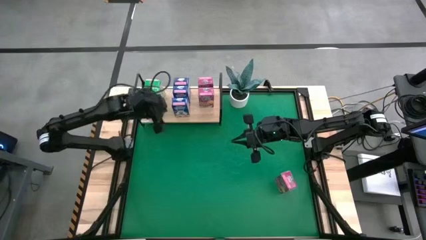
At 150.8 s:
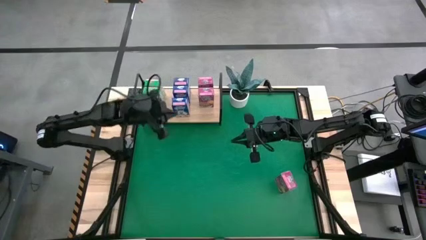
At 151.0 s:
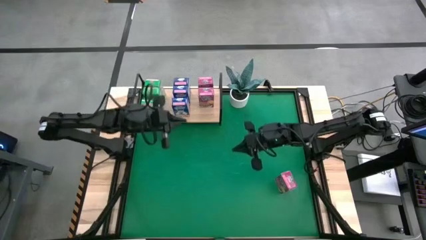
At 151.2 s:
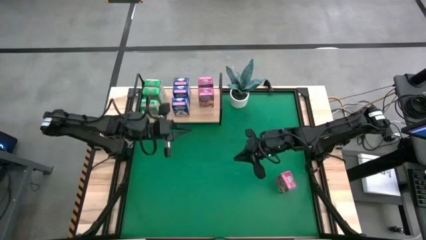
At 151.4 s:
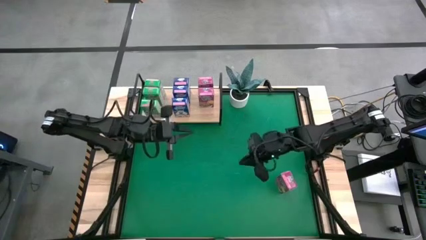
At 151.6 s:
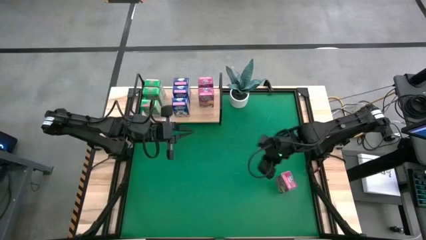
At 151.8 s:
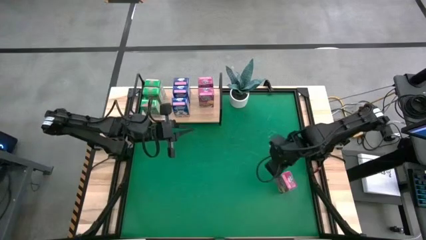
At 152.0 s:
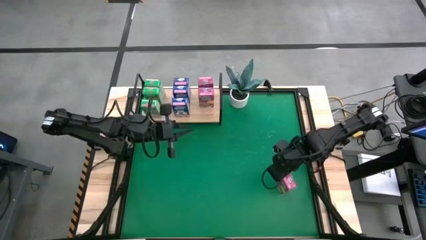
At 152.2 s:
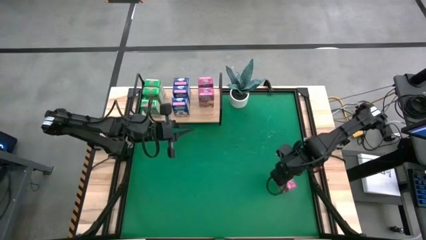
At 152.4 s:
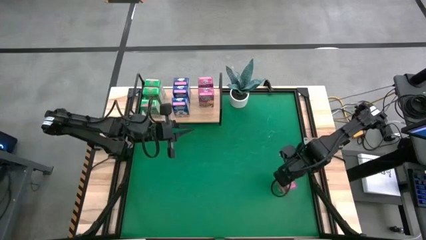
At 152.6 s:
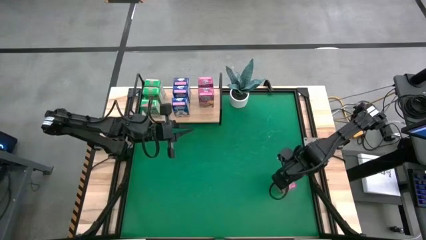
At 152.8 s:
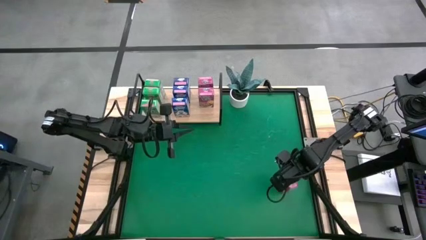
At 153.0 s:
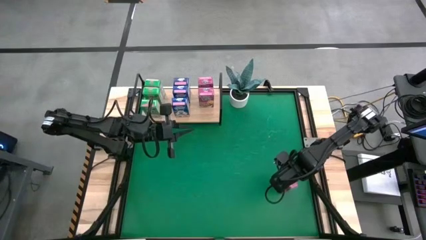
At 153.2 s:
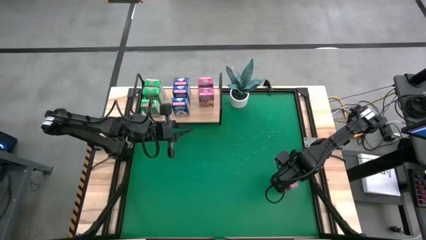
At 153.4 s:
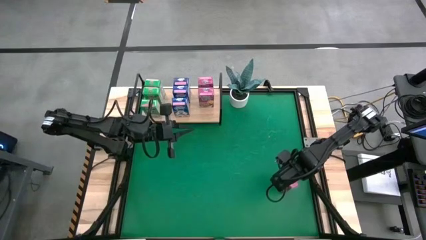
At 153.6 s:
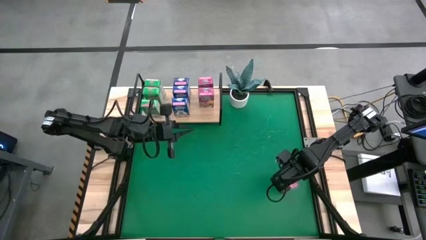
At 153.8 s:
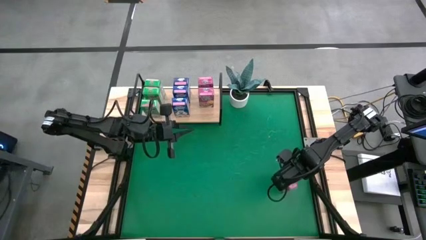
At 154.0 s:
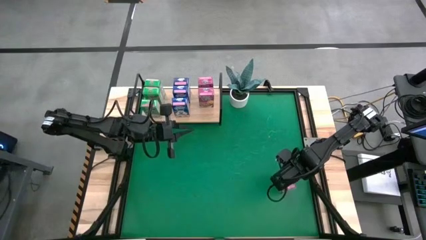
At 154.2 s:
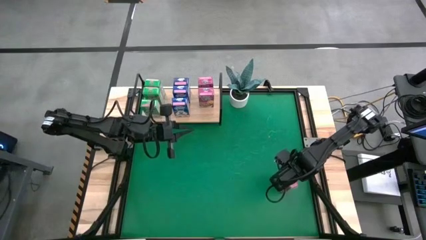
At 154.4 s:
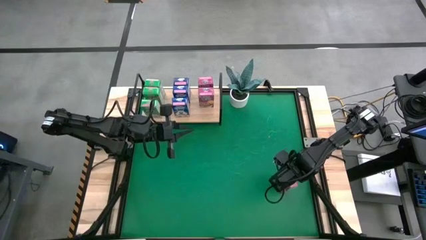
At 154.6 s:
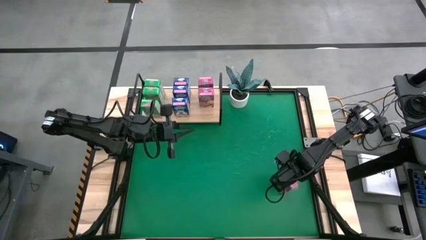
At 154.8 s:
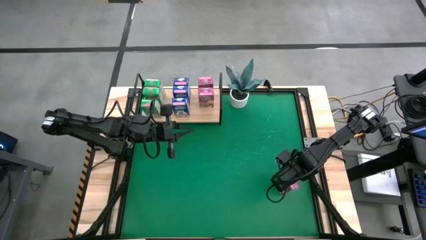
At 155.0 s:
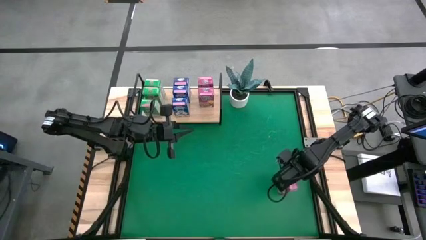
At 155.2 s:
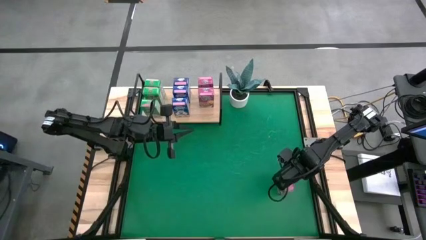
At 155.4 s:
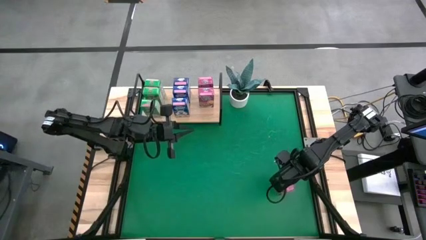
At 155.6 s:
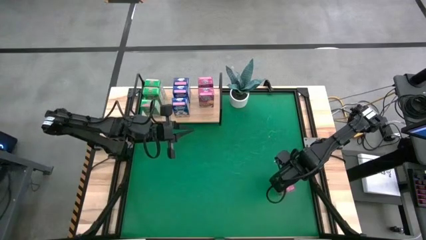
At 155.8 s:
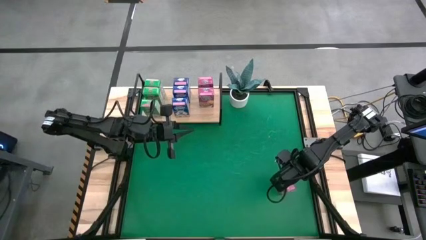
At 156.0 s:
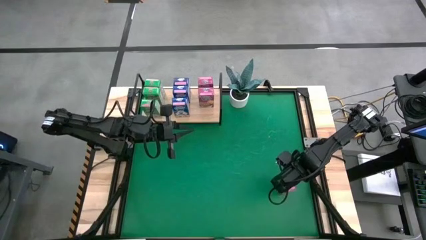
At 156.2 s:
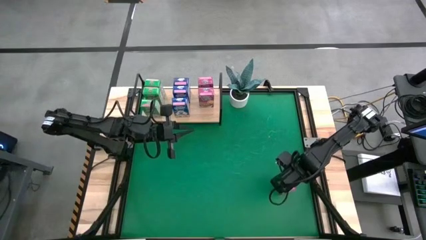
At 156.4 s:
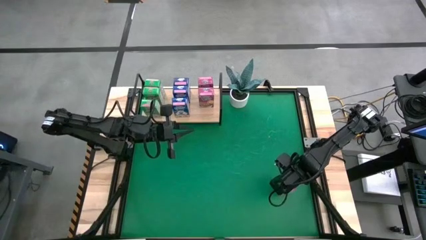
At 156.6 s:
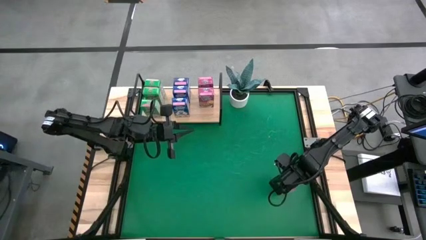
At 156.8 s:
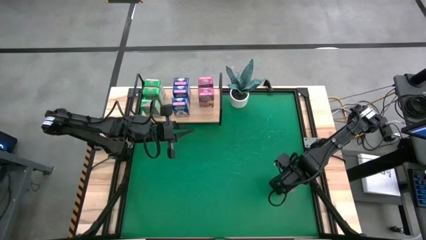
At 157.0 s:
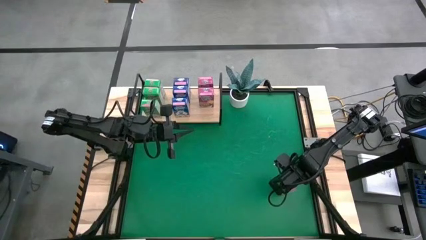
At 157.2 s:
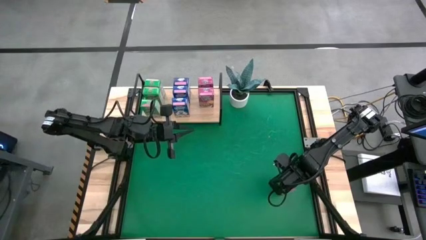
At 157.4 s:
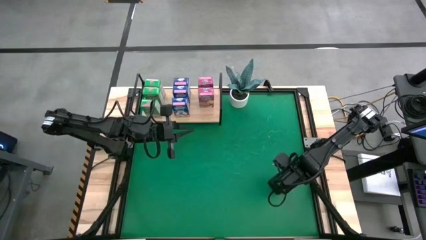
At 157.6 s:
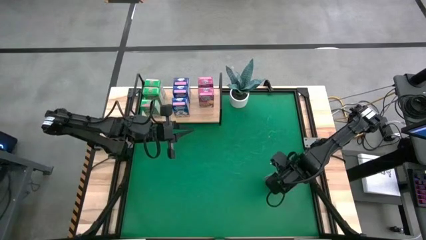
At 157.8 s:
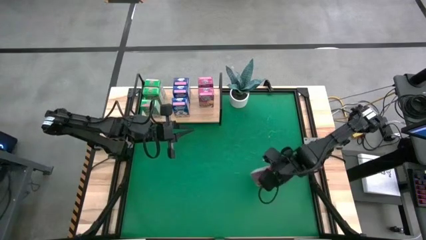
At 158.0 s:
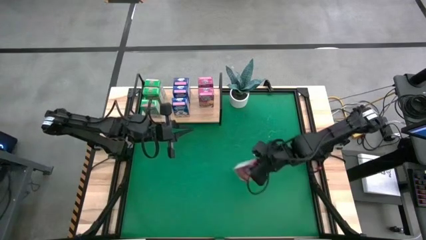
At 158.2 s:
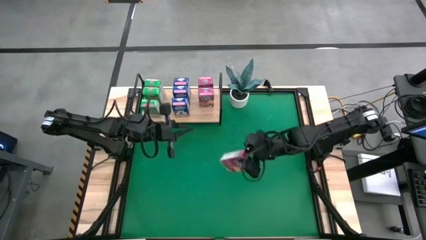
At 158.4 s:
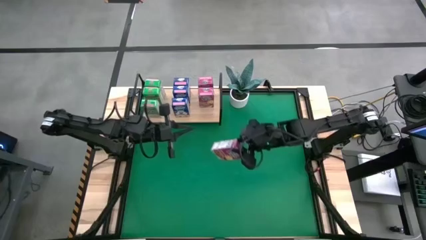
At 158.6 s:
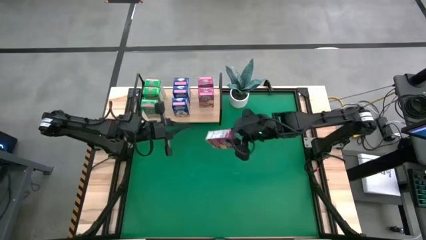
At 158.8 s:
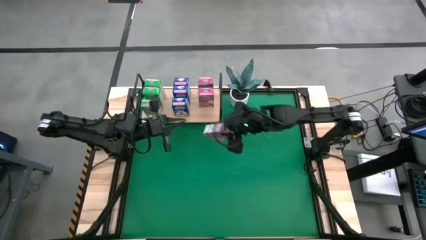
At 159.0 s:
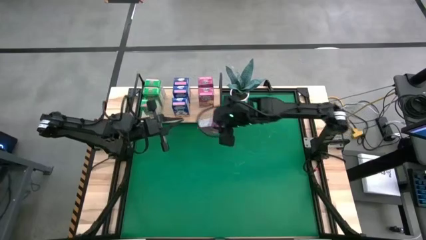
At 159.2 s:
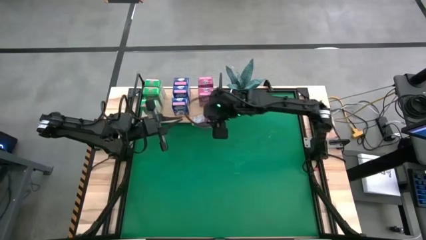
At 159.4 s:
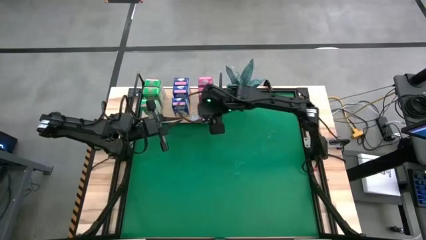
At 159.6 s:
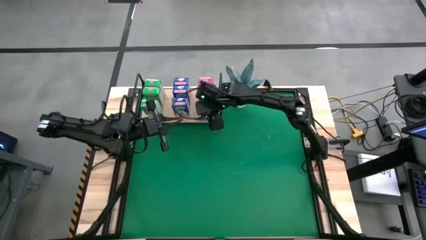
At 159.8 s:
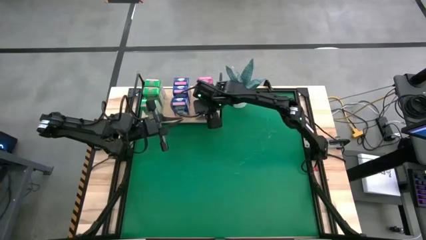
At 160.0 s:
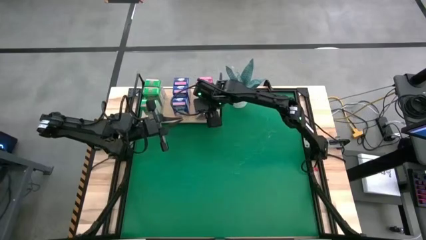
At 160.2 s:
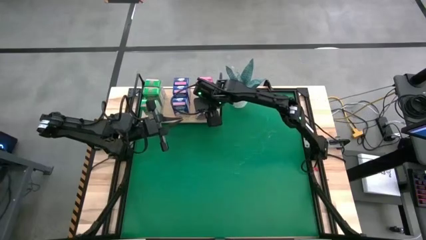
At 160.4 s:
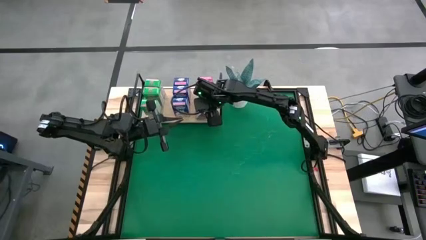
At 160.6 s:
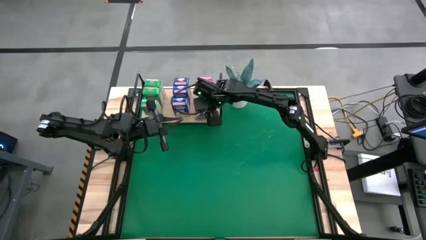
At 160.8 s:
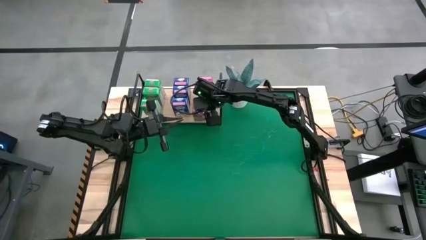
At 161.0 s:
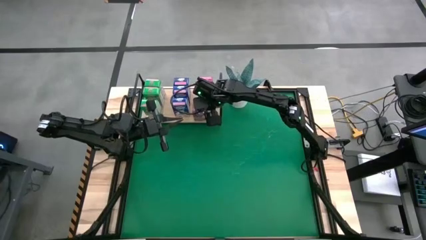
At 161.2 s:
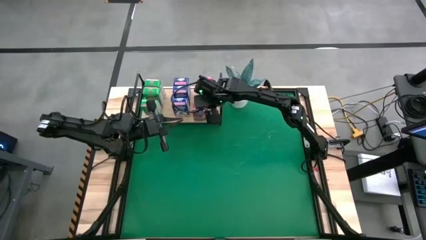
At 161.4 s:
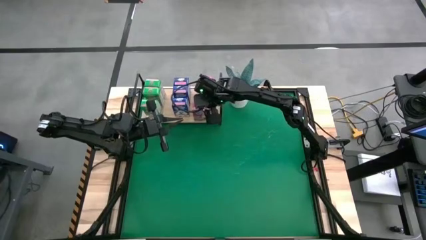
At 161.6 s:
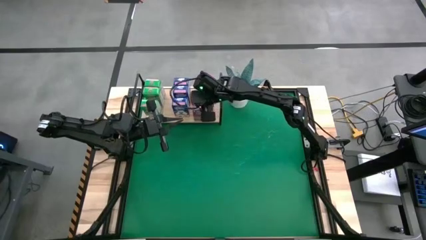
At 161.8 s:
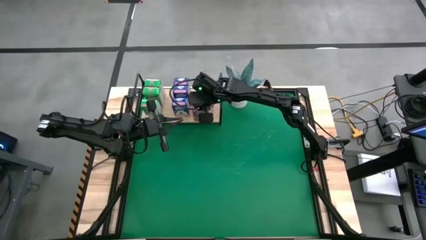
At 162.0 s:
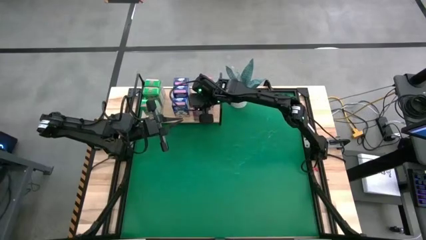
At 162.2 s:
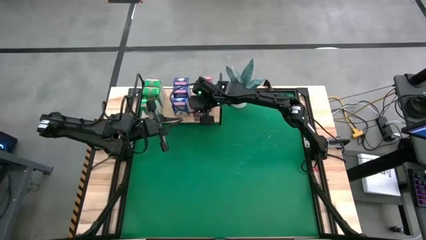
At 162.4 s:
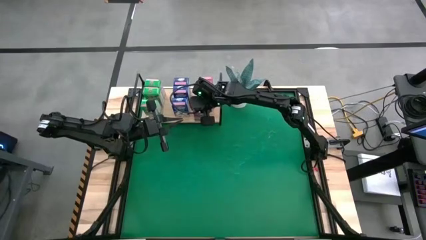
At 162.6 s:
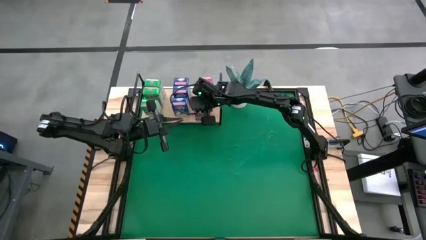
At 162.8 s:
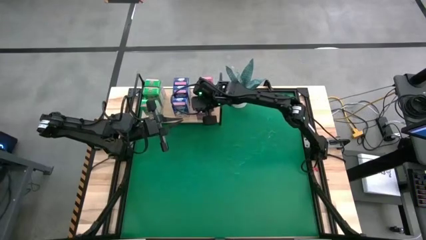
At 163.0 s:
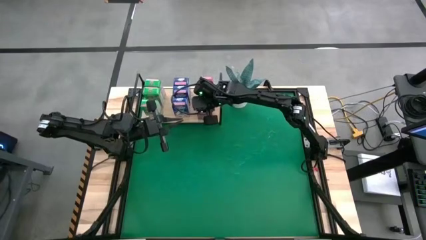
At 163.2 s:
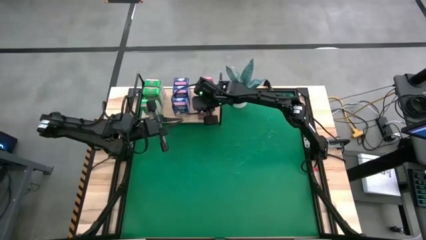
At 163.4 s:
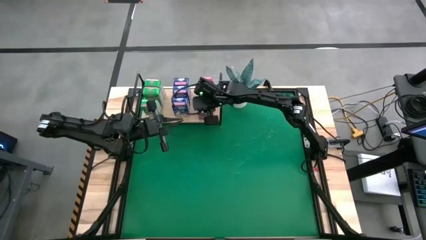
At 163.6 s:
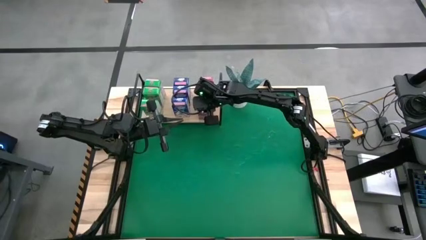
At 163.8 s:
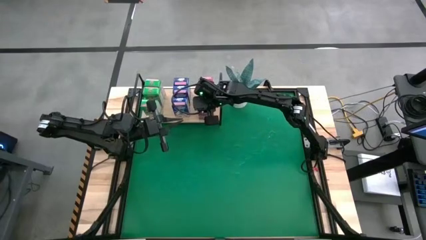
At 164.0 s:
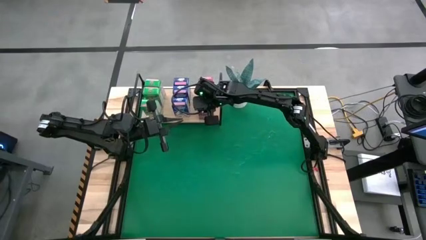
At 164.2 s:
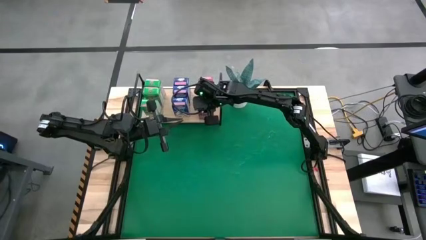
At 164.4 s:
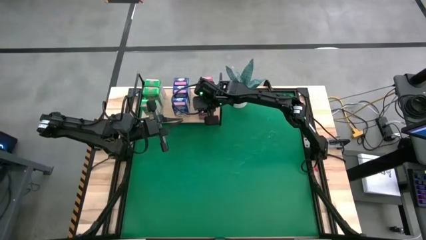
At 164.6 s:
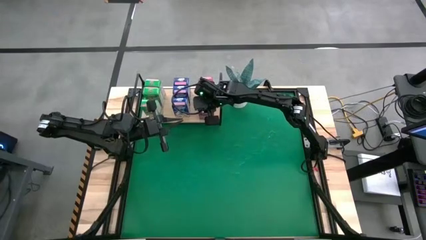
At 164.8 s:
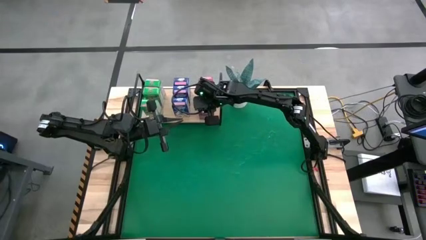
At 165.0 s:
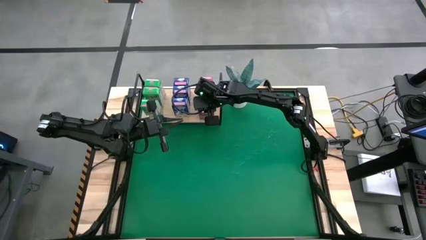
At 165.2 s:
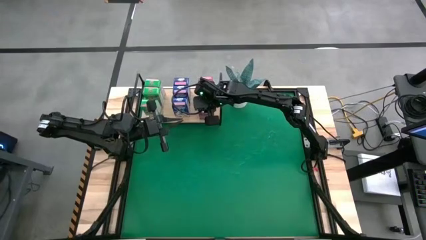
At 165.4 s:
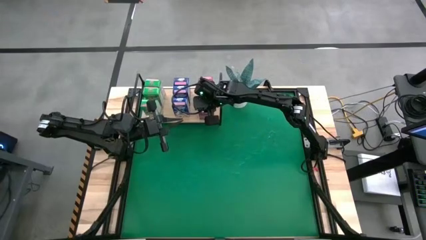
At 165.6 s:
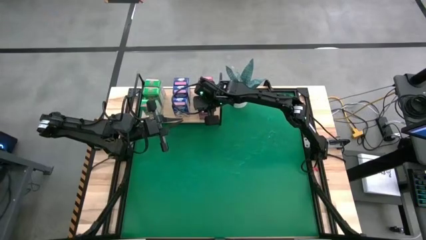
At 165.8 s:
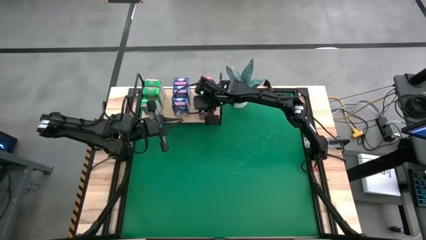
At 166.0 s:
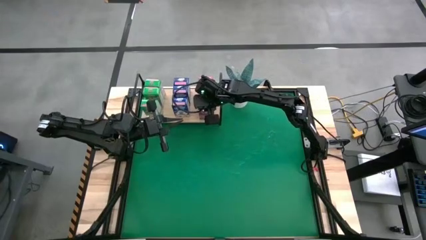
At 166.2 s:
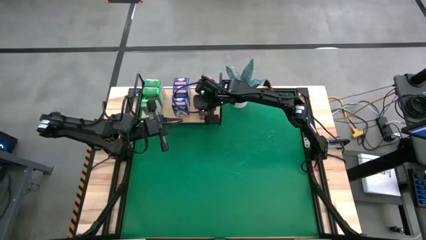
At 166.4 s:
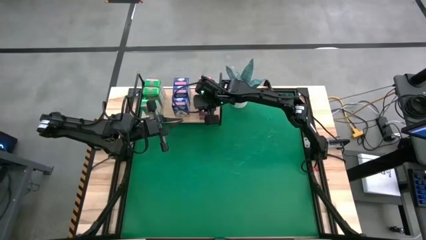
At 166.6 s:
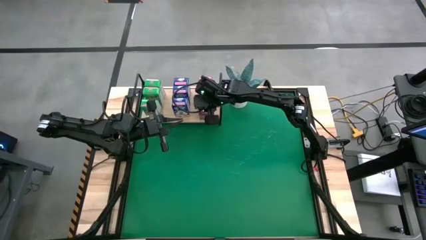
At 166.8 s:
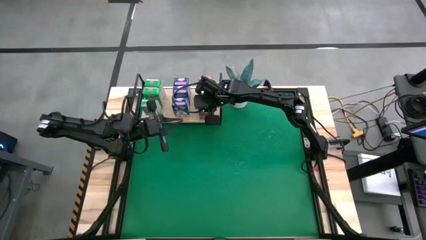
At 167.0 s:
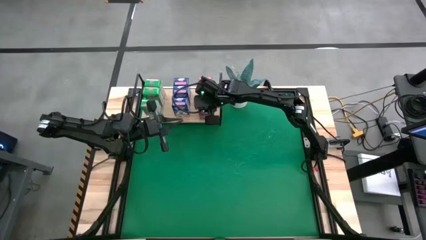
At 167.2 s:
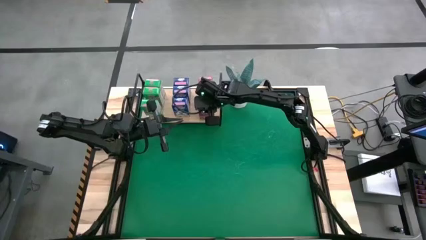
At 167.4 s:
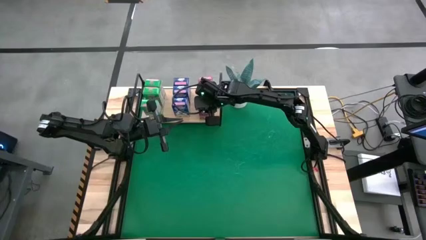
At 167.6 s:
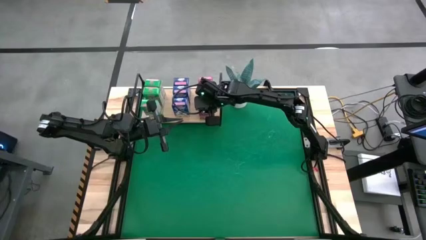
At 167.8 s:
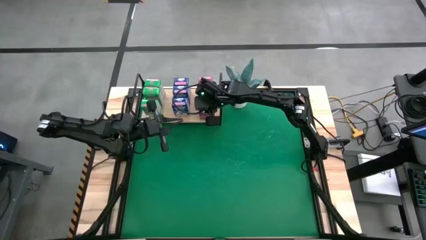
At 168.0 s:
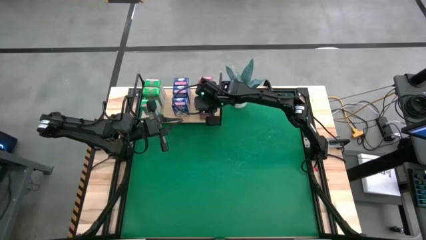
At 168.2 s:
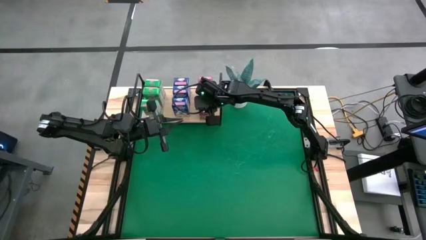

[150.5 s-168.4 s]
Task: Stack cereal on shelf
Put the pink cereal box on the shelf aligned with the other pink cereal boxes
